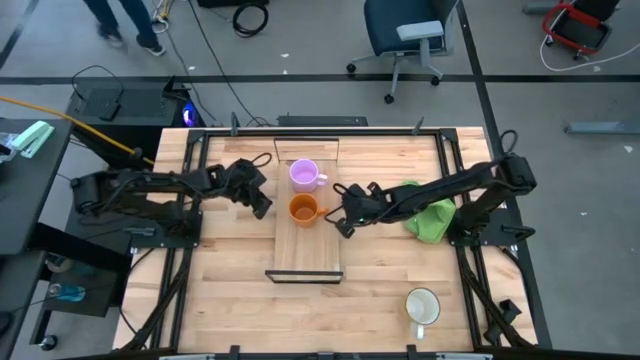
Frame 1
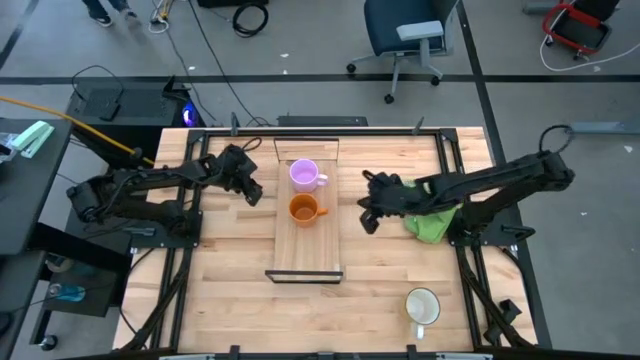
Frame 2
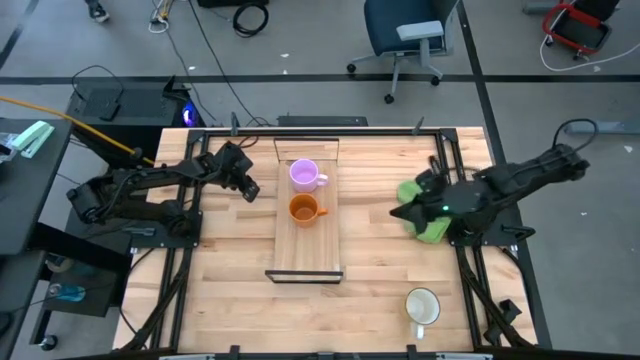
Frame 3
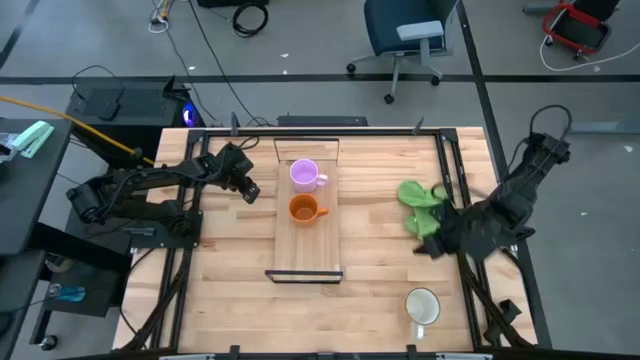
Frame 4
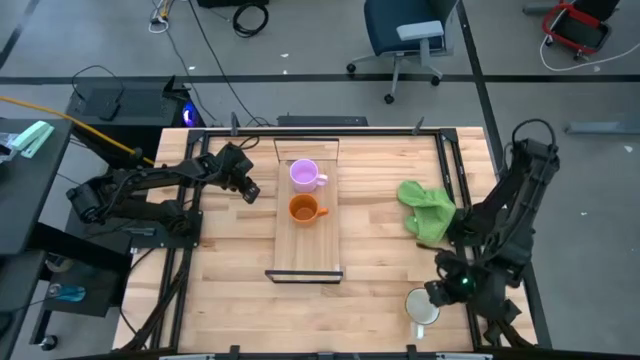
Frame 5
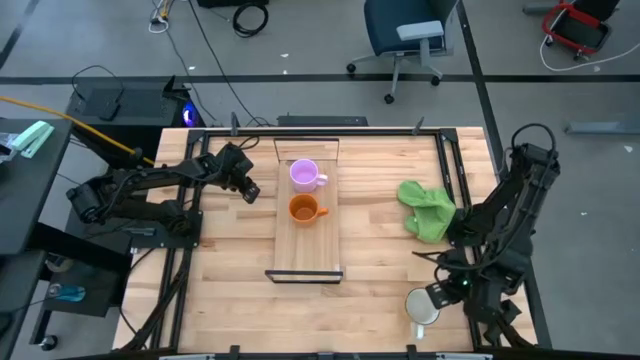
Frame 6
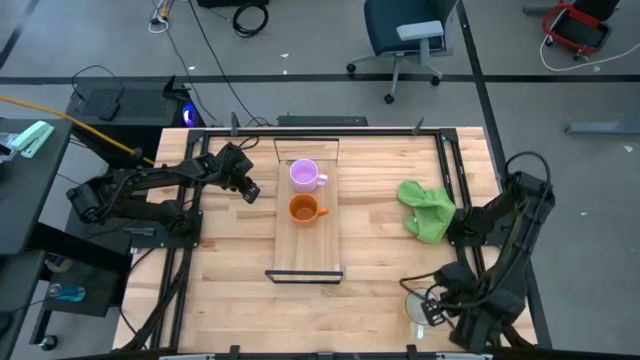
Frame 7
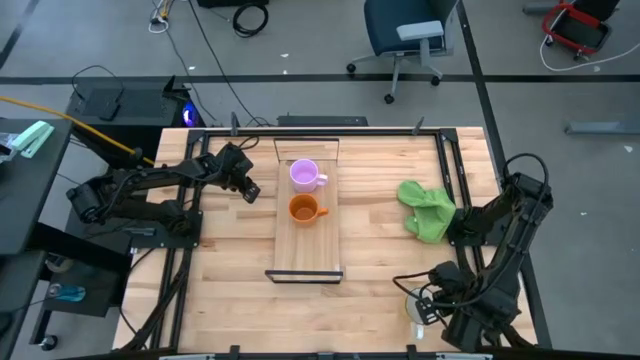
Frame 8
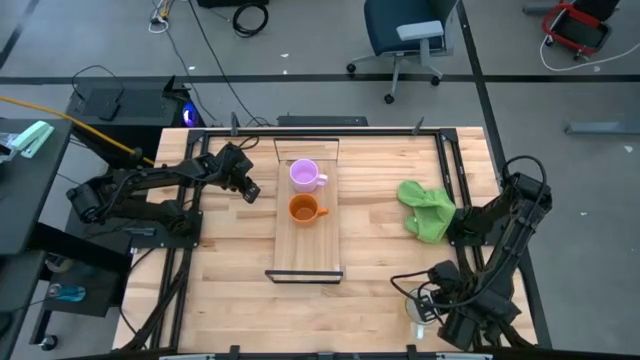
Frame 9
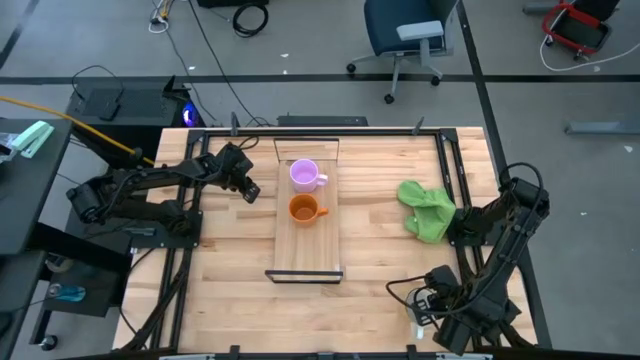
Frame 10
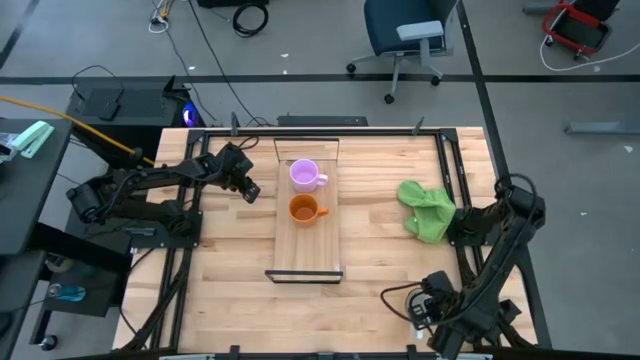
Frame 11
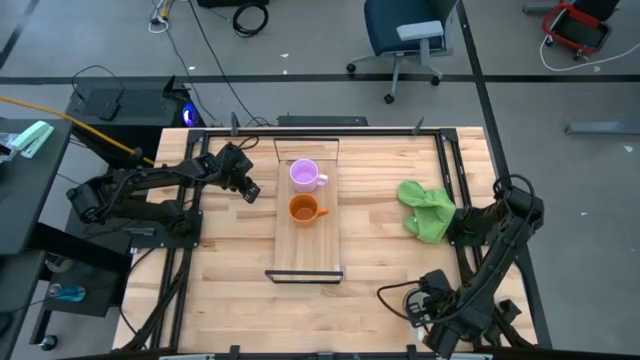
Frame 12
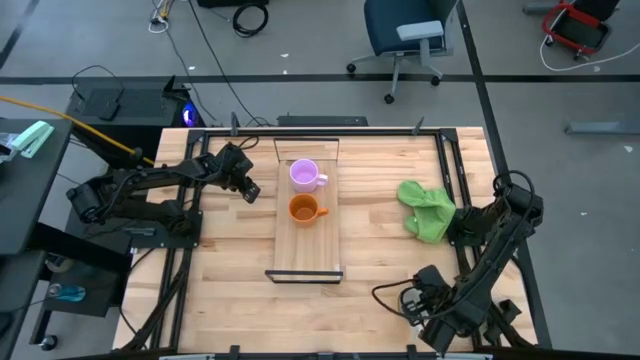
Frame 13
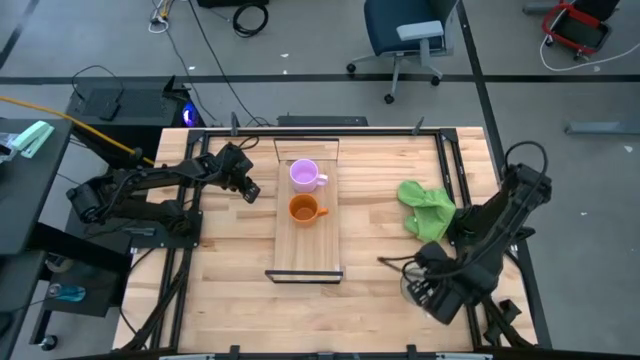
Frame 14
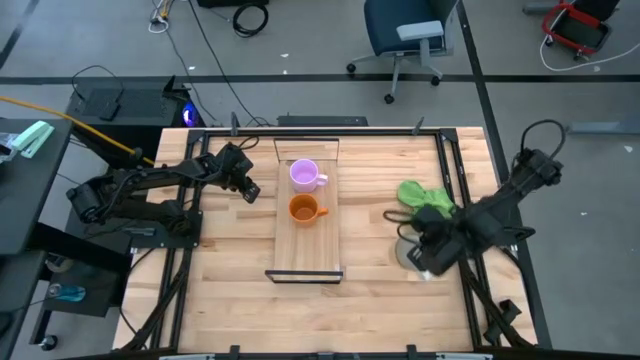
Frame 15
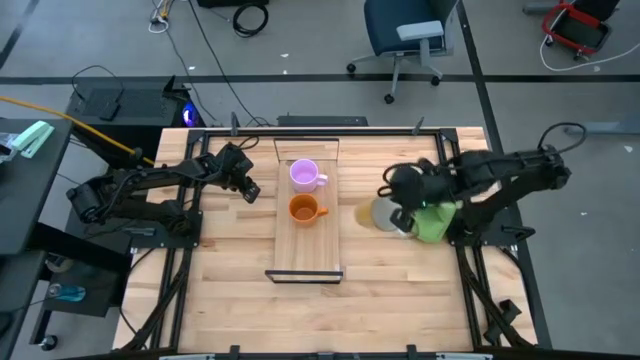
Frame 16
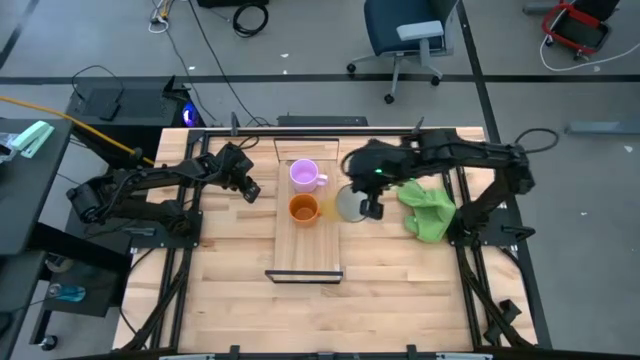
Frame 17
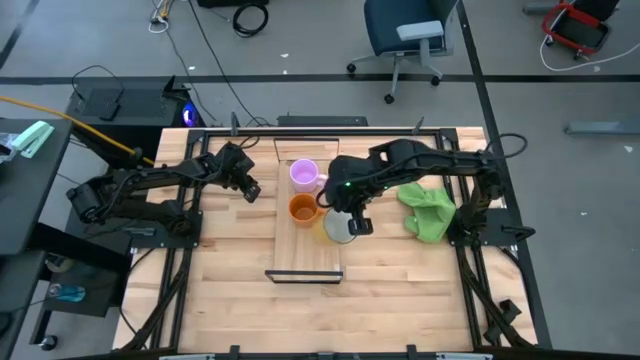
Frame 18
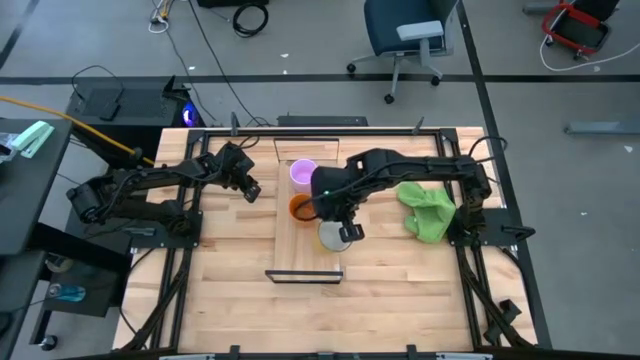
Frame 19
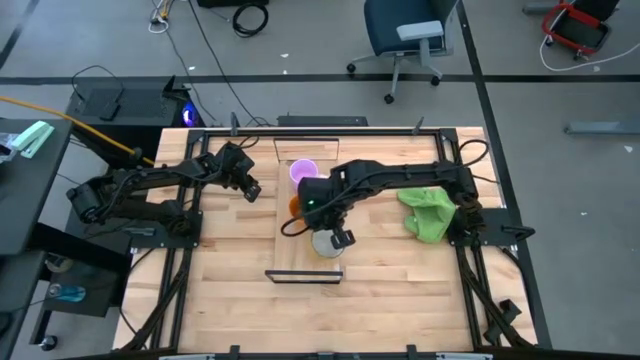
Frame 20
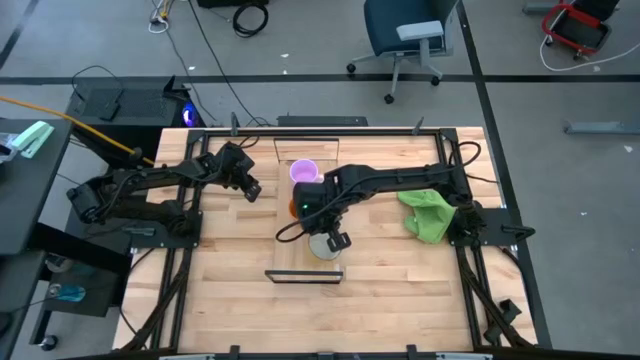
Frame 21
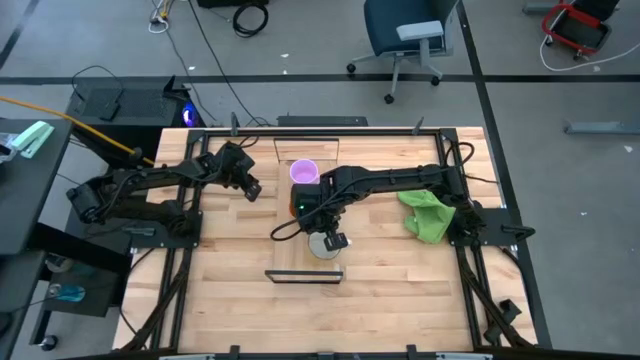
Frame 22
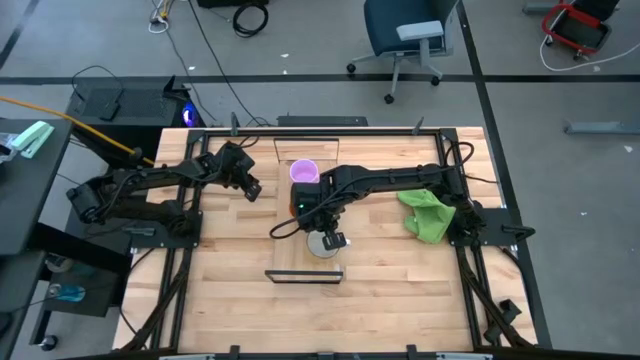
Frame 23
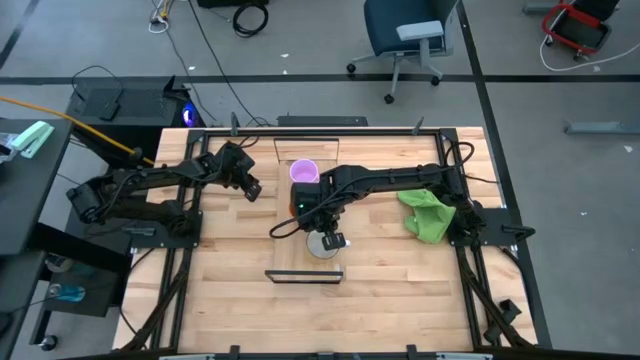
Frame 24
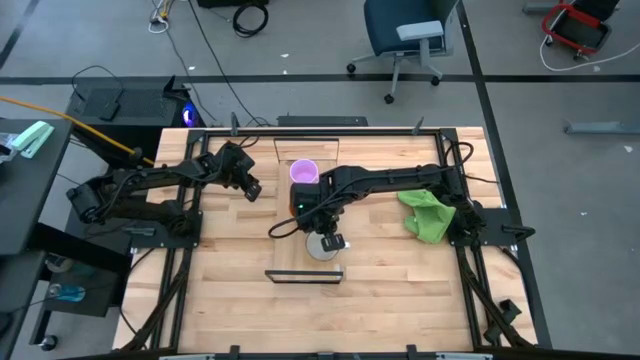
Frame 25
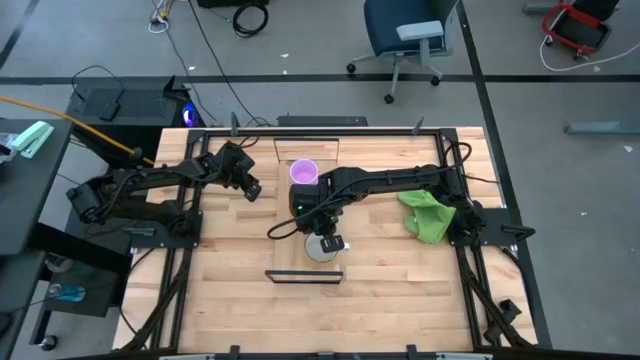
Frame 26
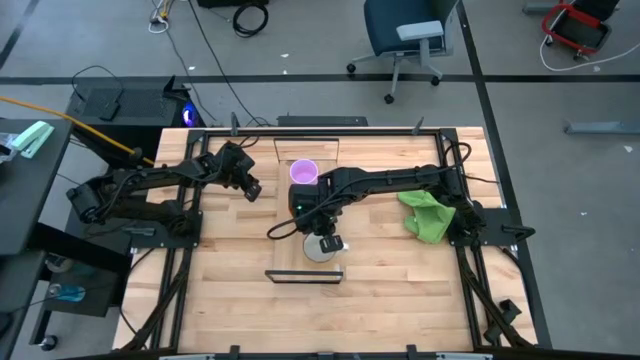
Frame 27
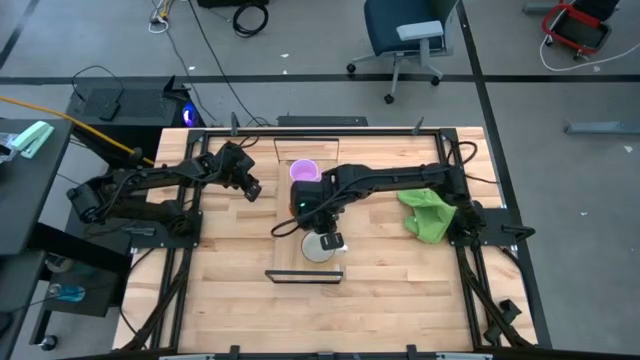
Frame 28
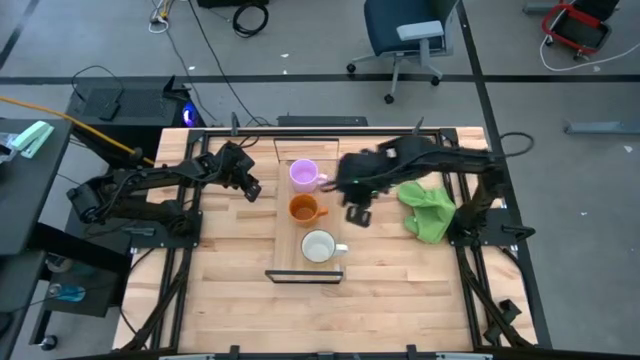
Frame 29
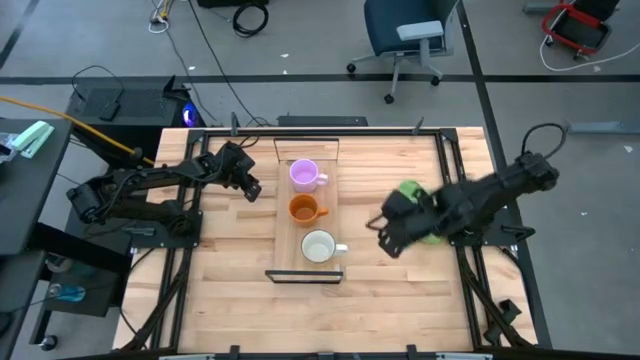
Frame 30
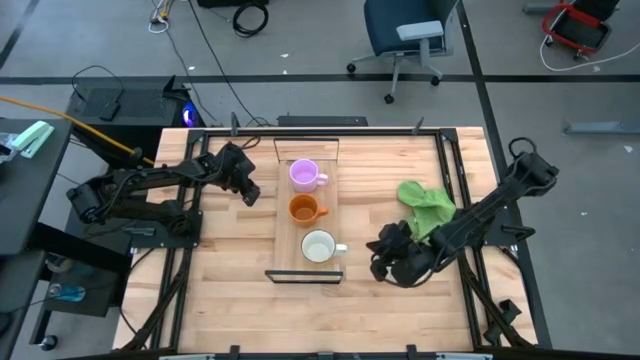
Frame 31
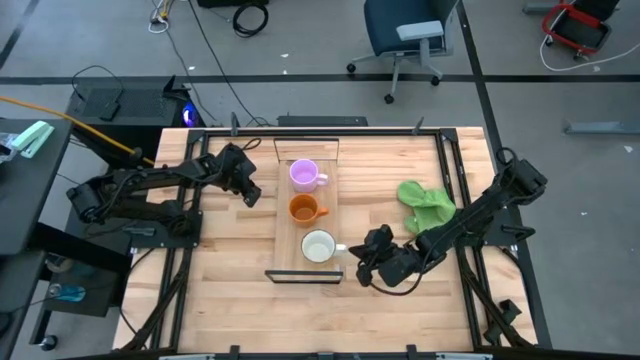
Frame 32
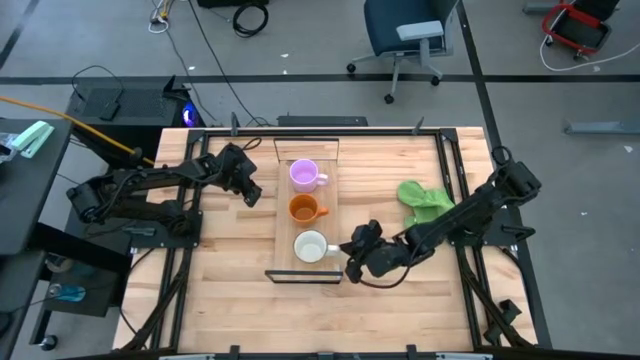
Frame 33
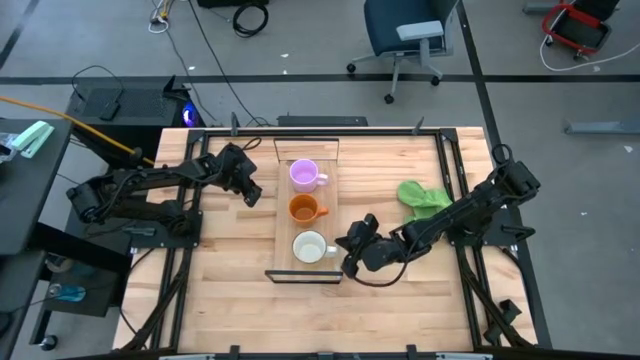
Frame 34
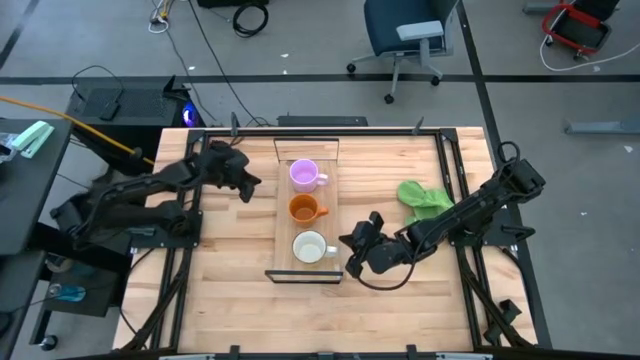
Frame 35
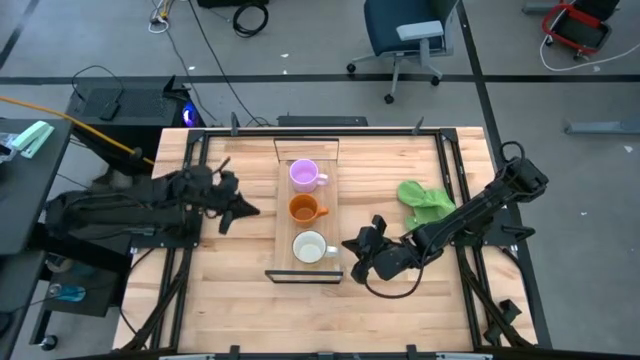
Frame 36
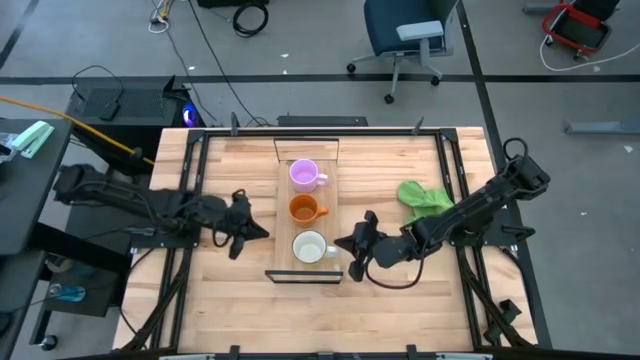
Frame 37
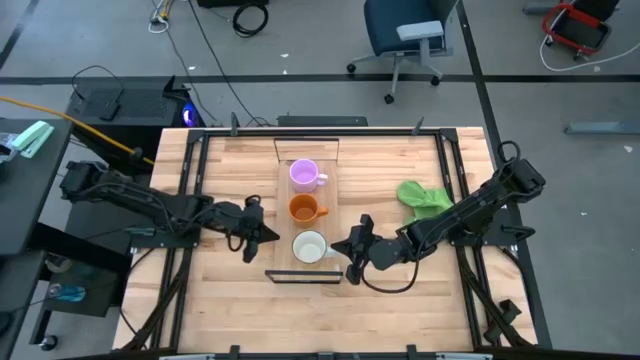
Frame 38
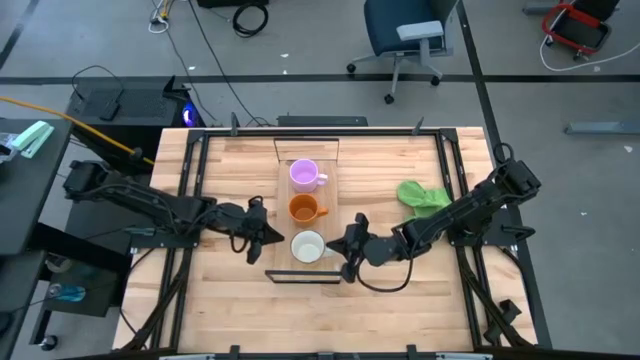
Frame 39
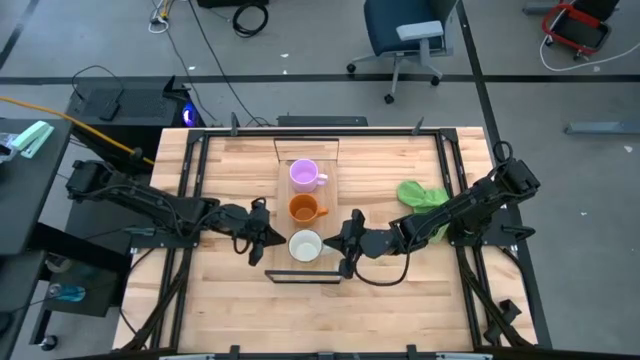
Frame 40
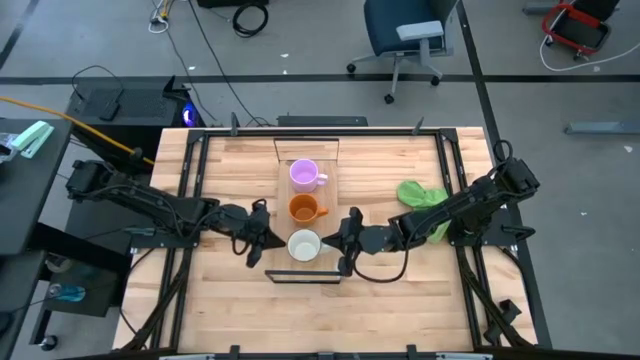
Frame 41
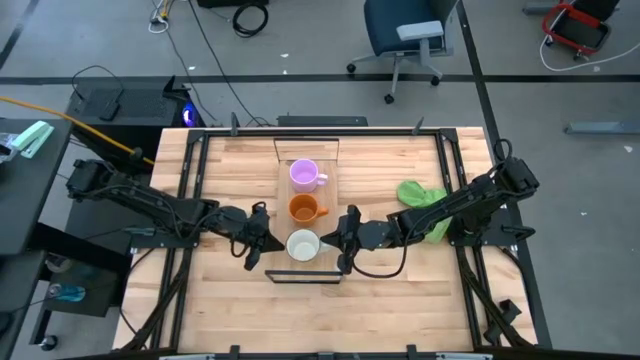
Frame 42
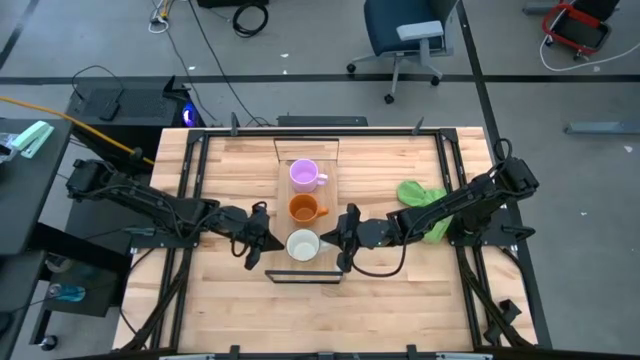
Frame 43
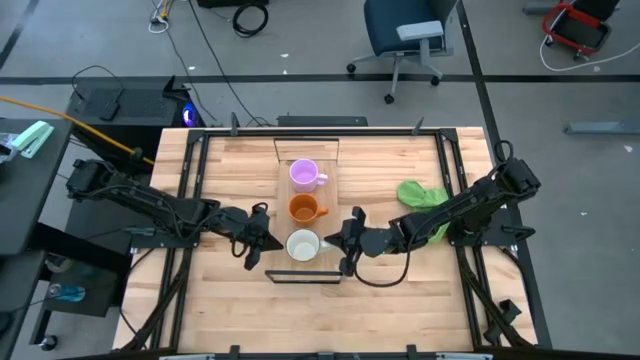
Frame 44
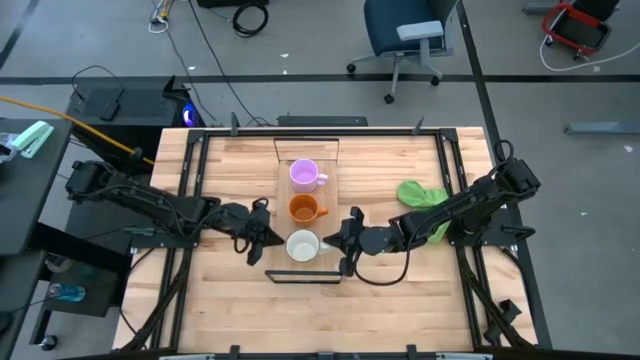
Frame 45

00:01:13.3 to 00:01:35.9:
Task: Stack small to large cups/mugs on shelf
Put the yellow mug on the shelf
